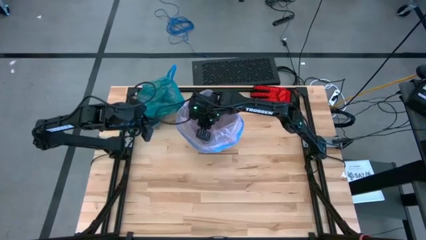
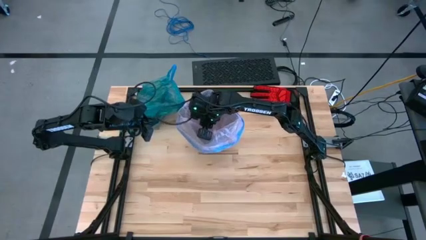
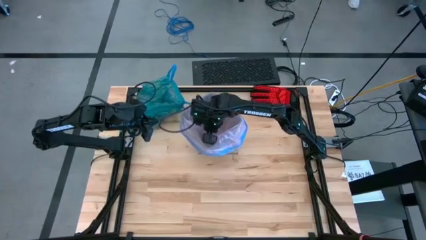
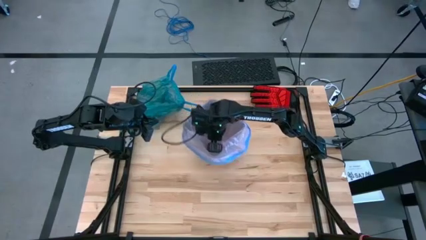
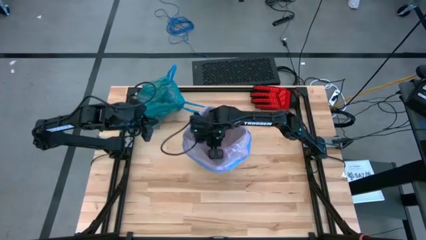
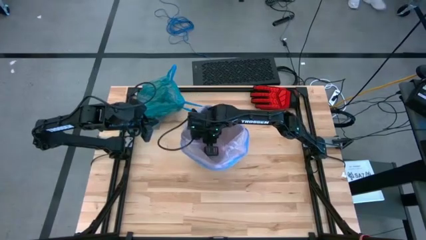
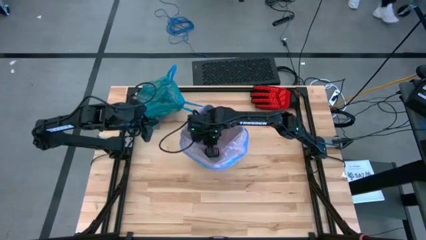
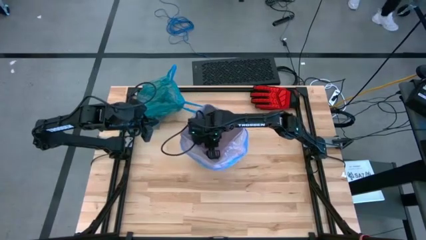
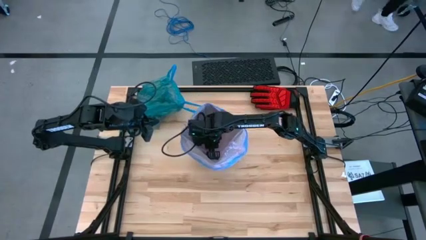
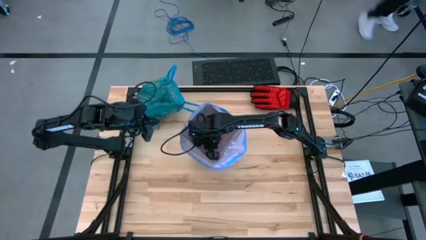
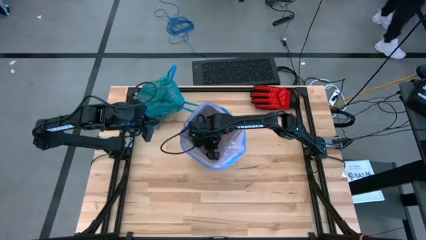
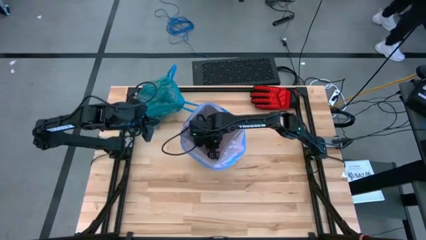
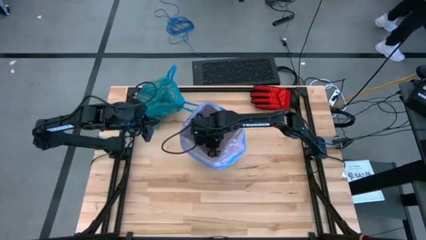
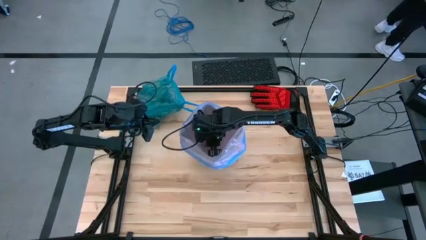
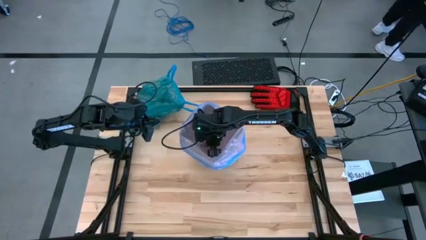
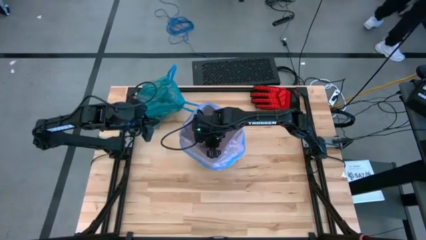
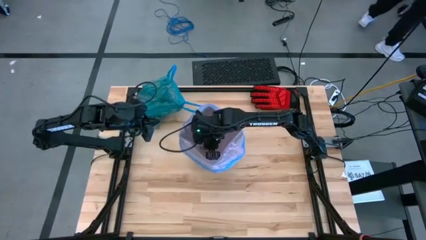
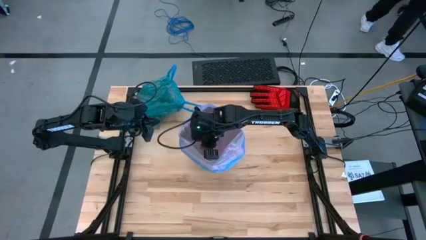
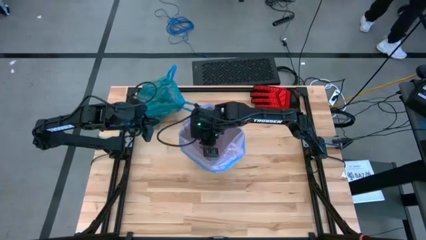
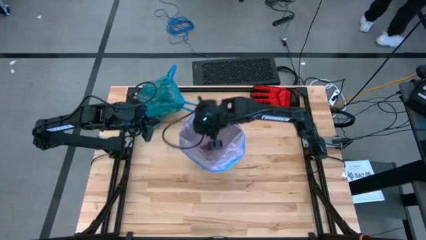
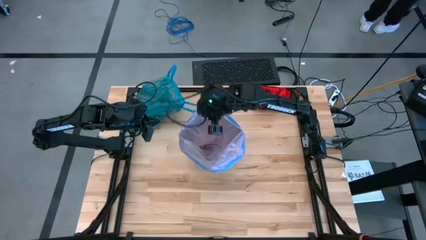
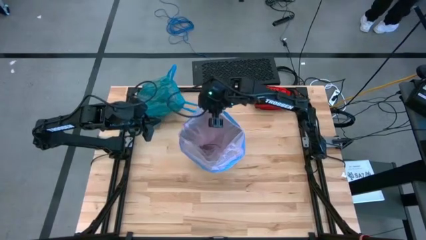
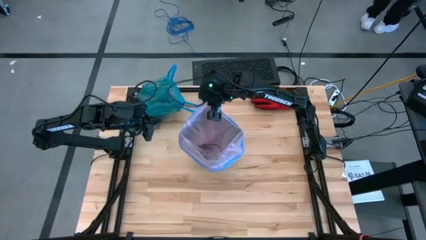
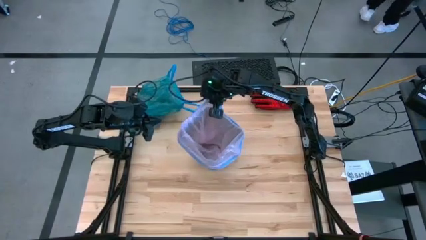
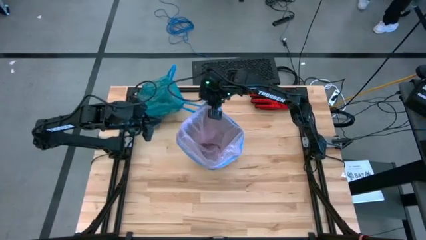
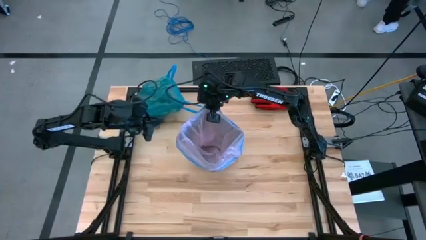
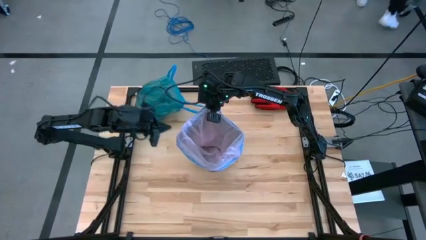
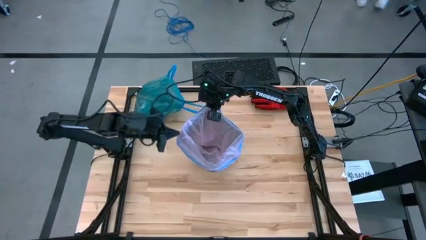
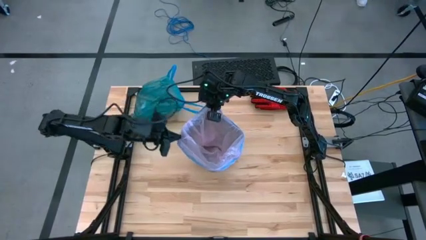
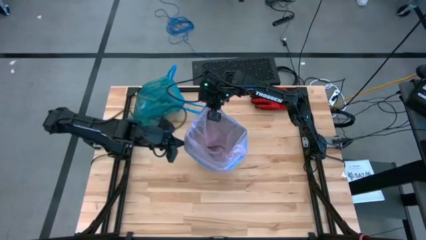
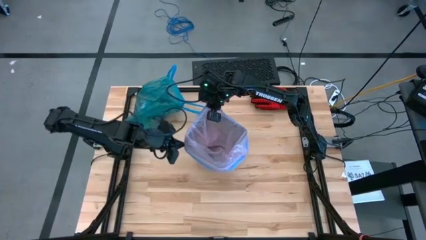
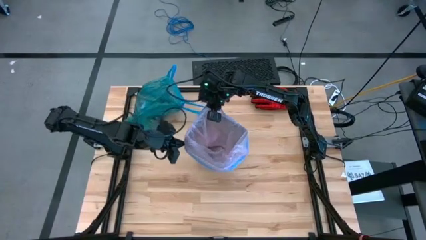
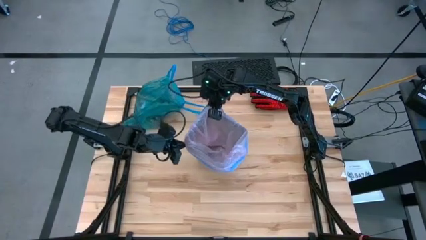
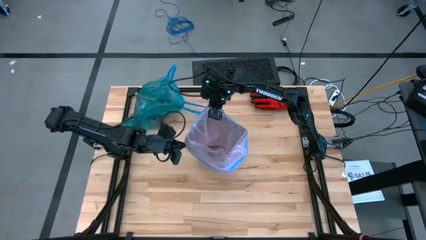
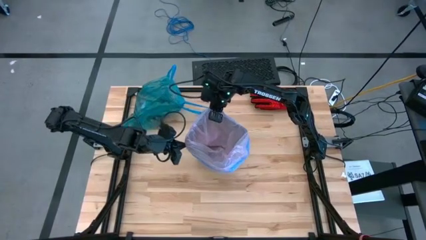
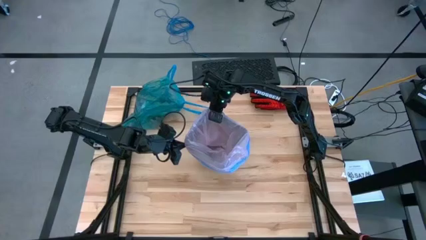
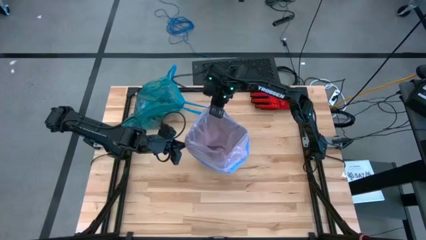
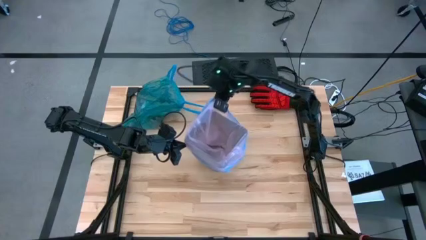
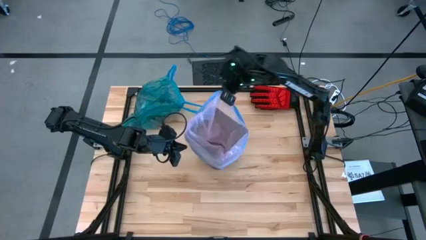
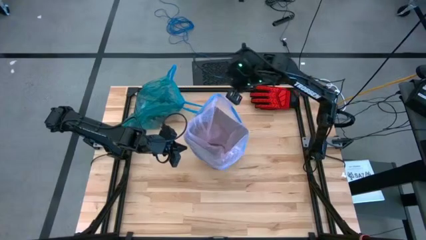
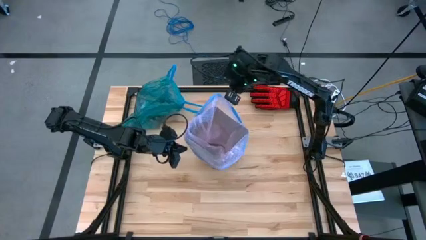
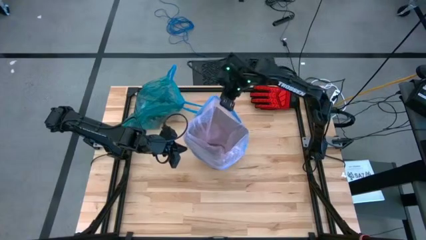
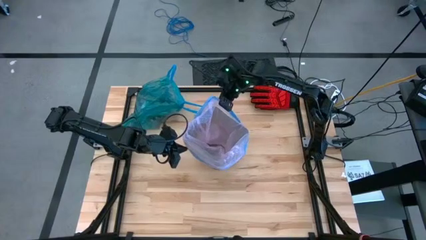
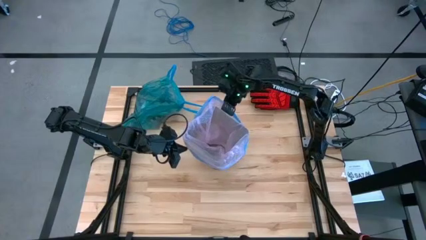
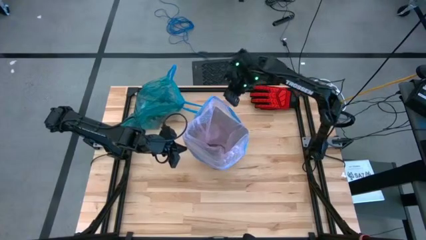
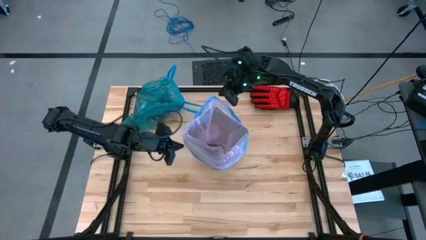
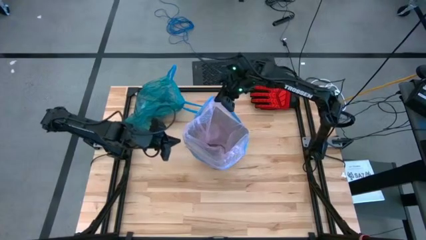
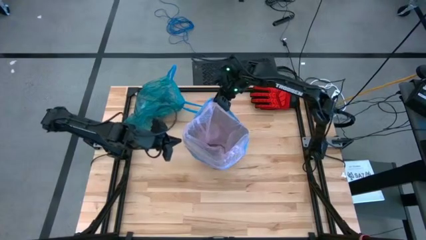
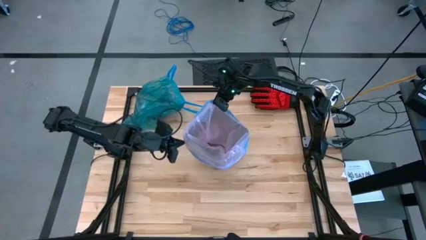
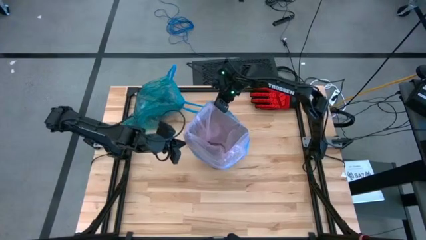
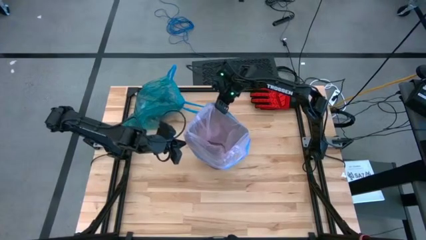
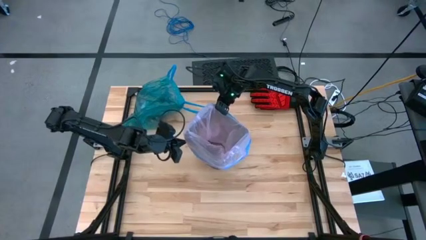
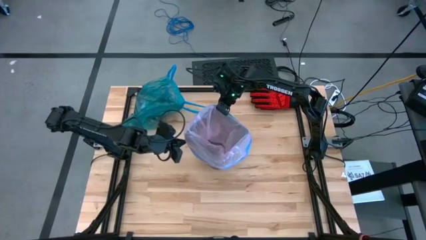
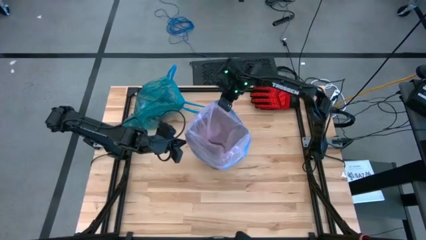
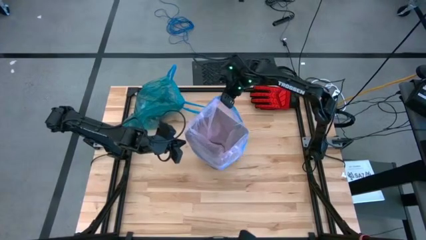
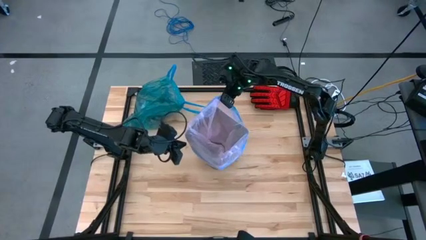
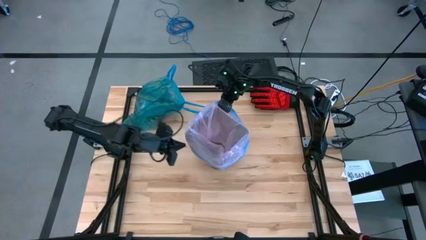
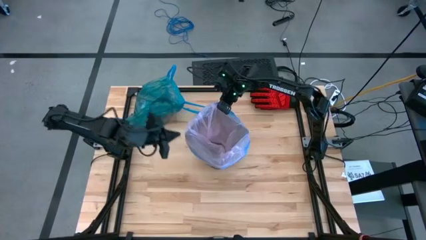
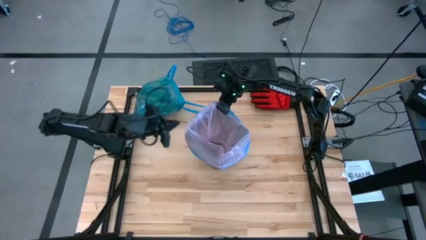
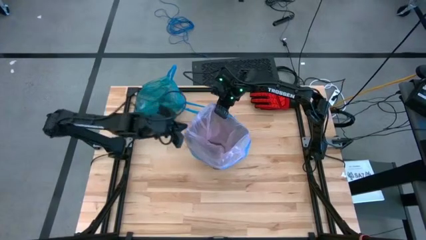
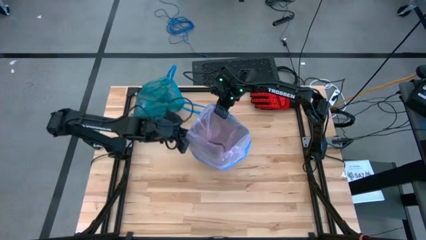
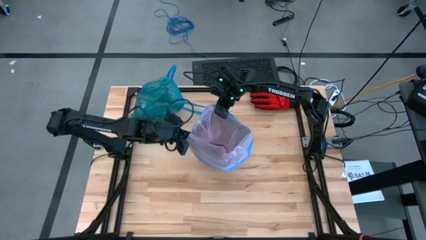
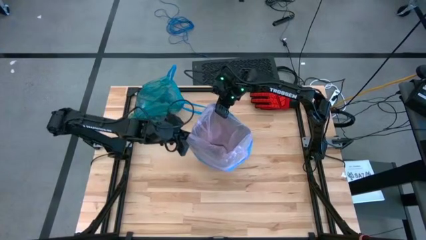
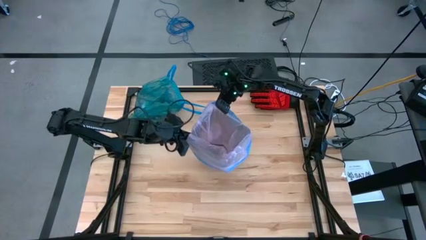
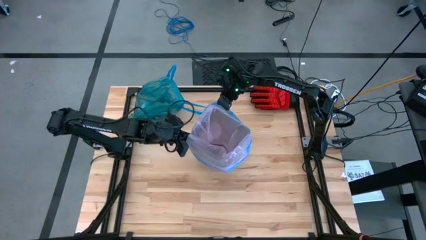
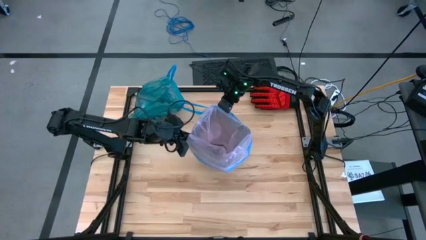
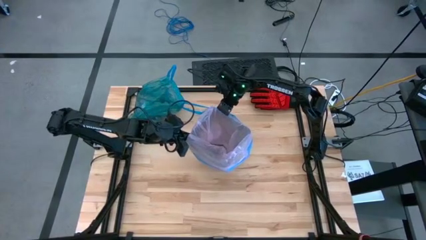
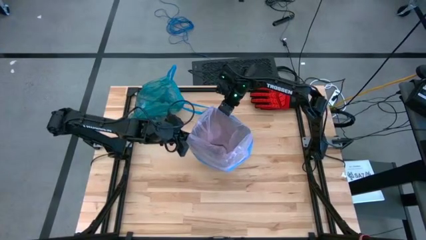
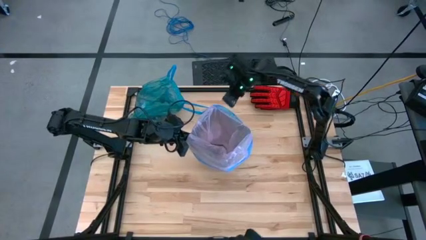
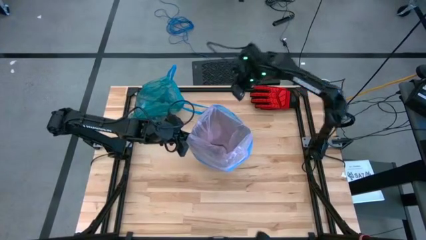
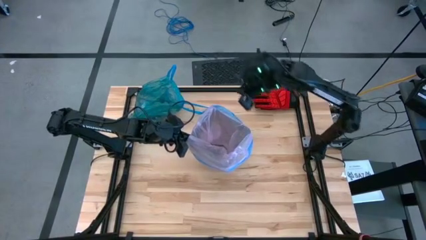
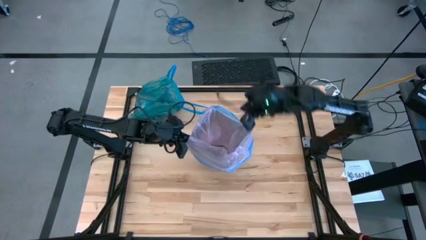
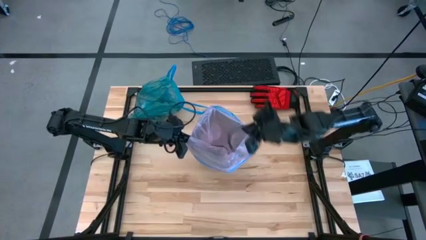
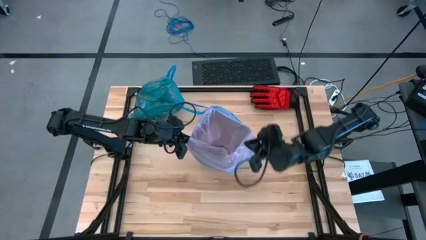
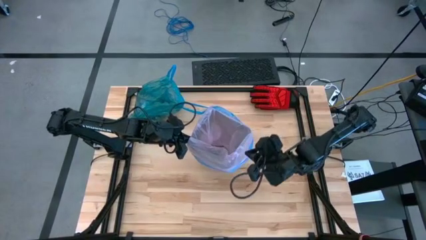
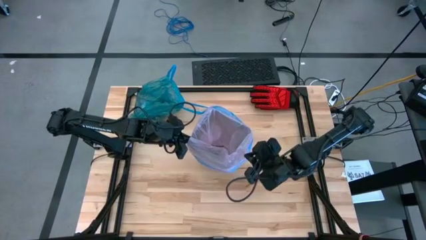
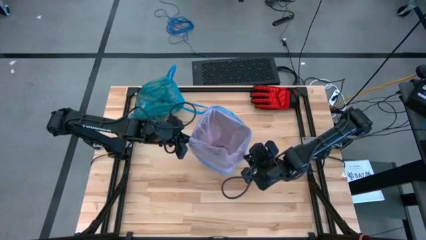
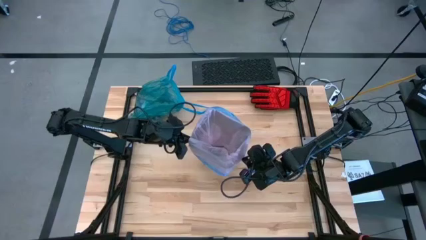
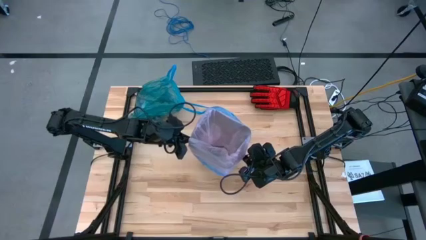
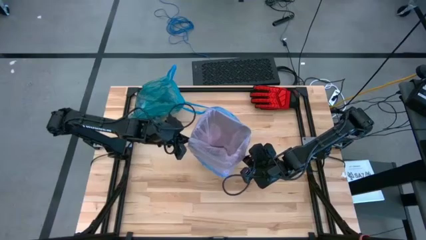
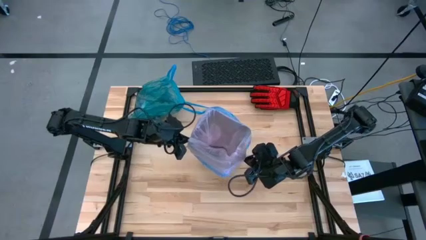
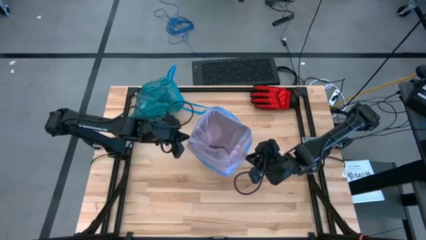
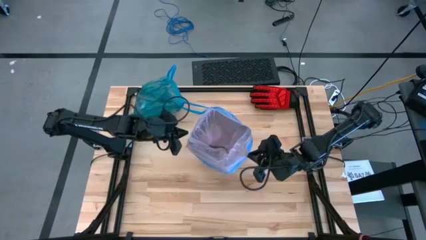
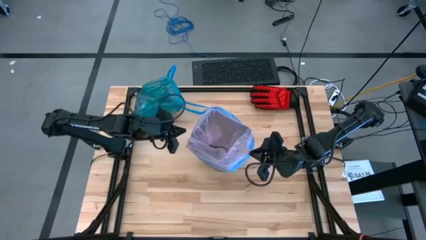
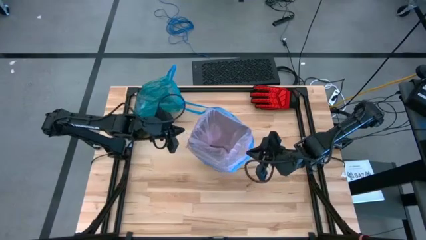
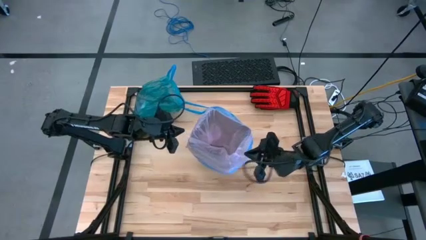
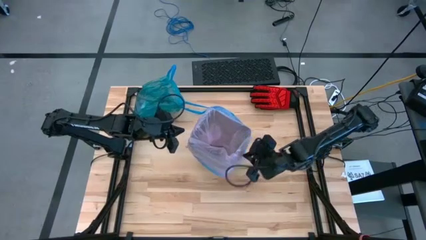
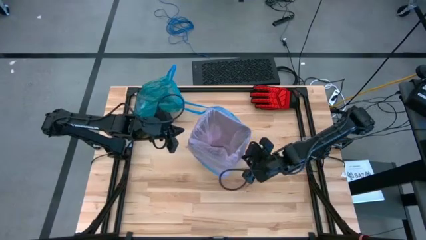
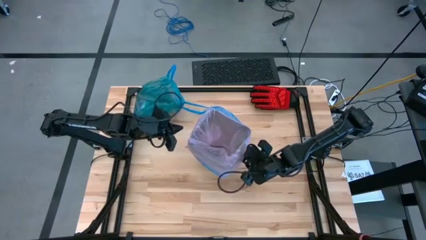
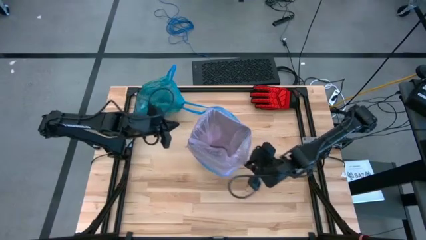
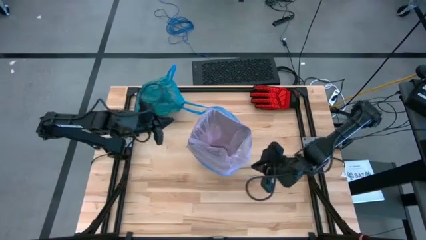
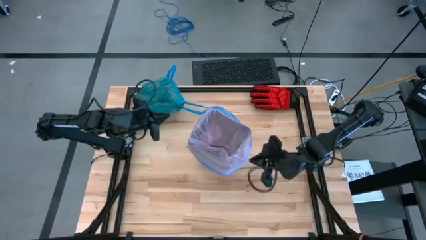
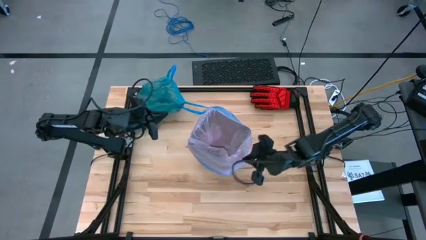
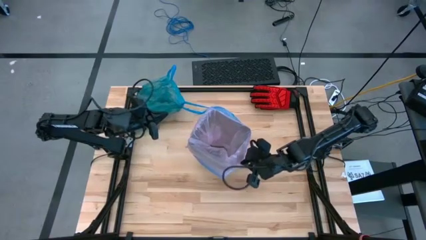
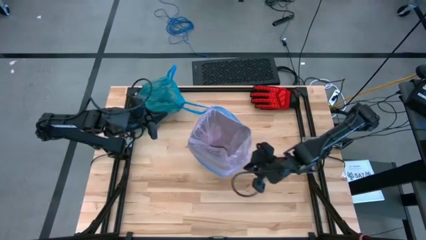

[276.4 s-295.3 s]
Task: place trash/remove bag and relplace
Insert a new pink trash bag into the black trash bin
